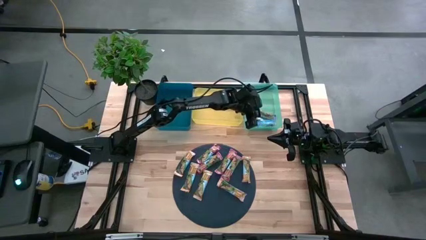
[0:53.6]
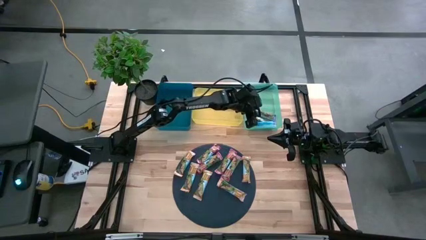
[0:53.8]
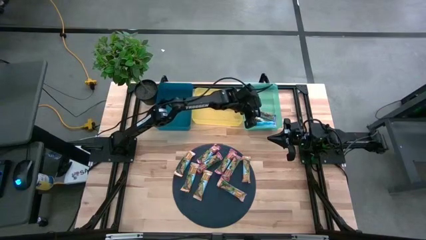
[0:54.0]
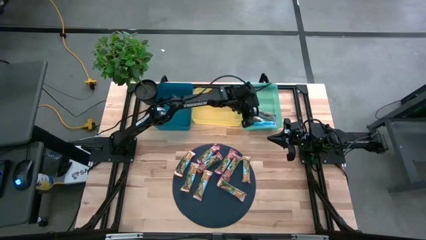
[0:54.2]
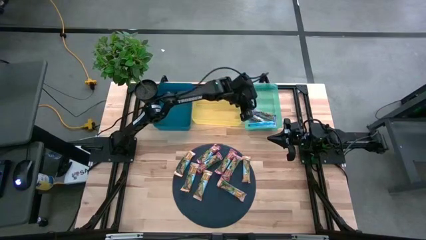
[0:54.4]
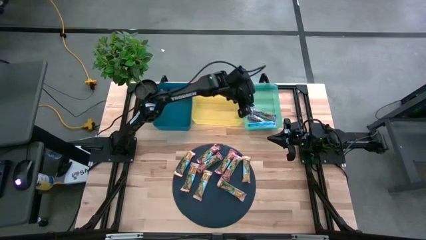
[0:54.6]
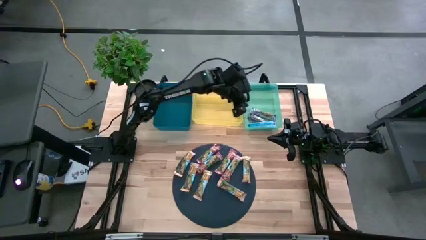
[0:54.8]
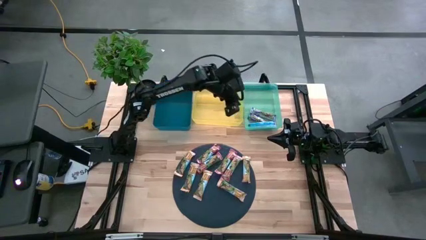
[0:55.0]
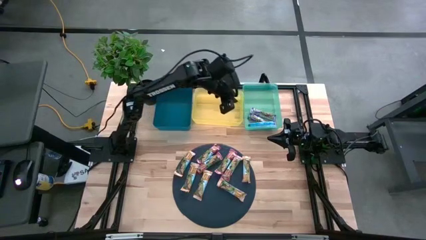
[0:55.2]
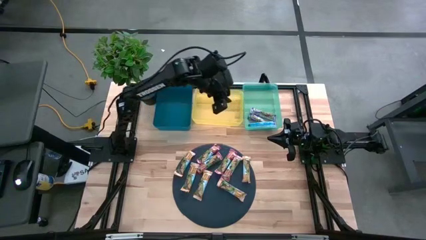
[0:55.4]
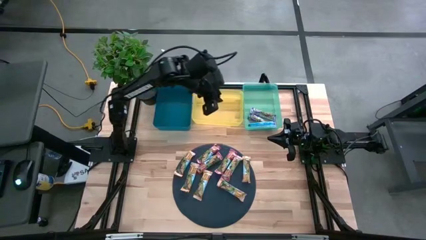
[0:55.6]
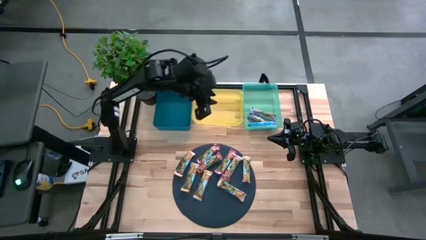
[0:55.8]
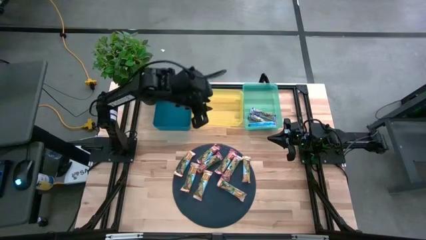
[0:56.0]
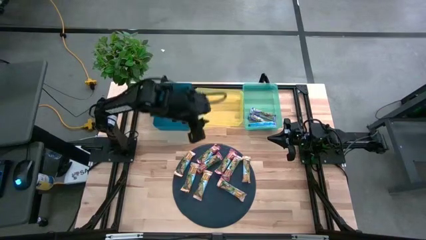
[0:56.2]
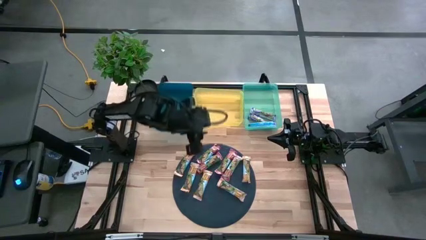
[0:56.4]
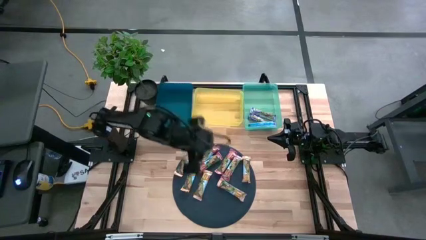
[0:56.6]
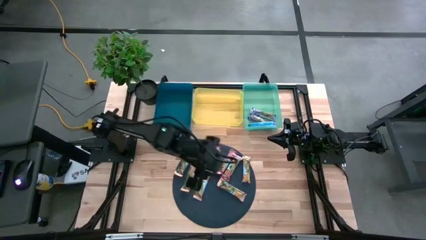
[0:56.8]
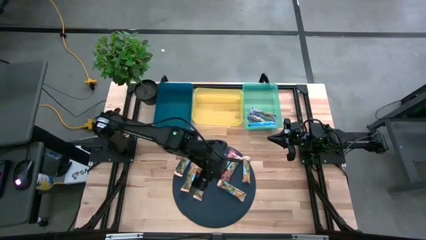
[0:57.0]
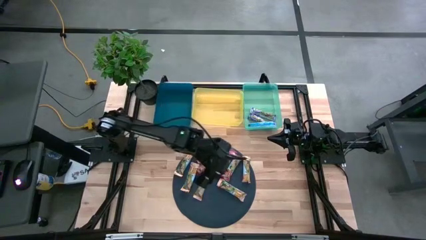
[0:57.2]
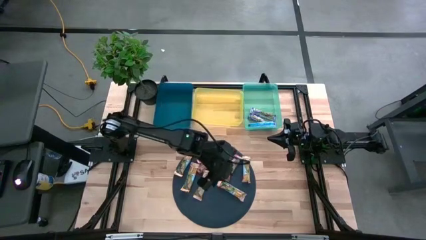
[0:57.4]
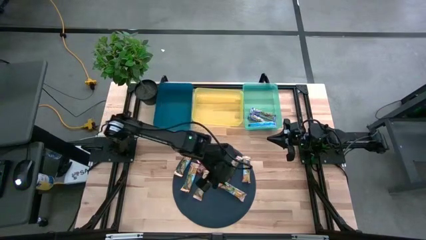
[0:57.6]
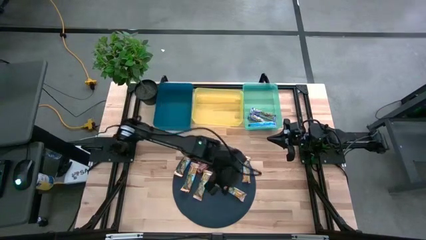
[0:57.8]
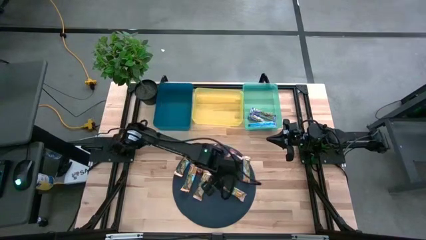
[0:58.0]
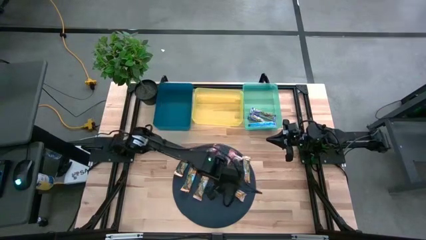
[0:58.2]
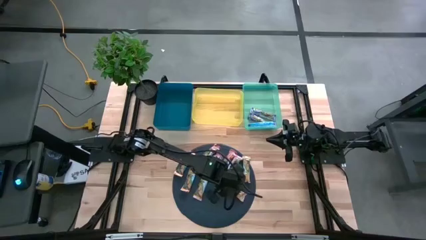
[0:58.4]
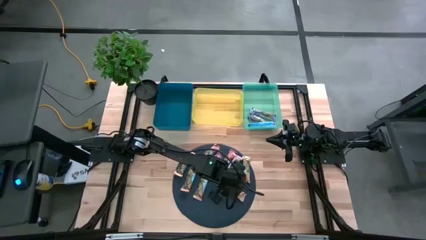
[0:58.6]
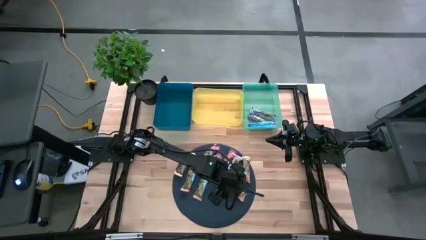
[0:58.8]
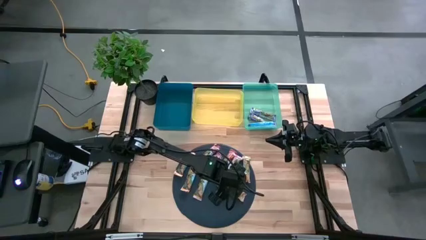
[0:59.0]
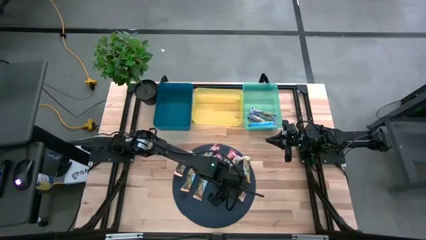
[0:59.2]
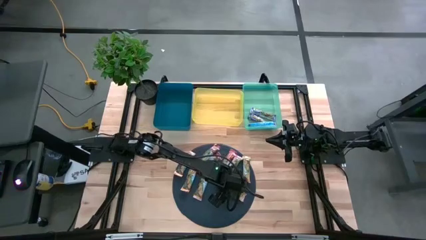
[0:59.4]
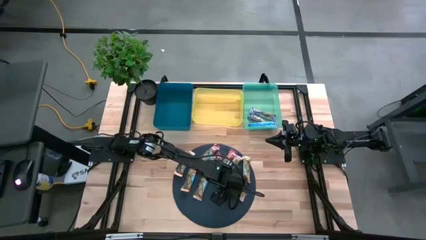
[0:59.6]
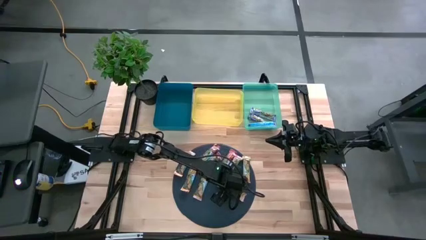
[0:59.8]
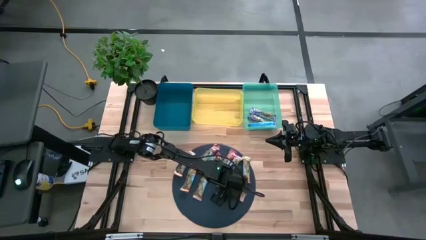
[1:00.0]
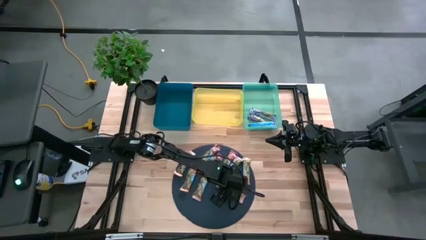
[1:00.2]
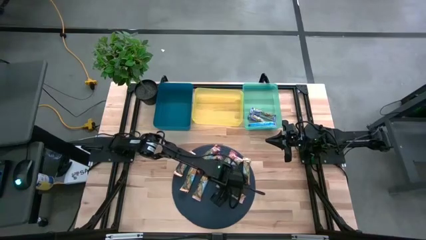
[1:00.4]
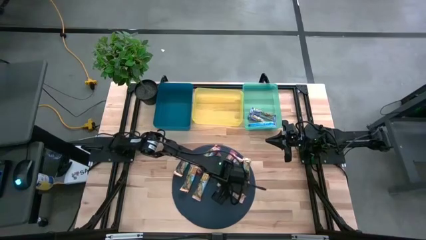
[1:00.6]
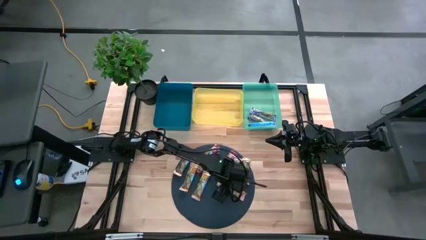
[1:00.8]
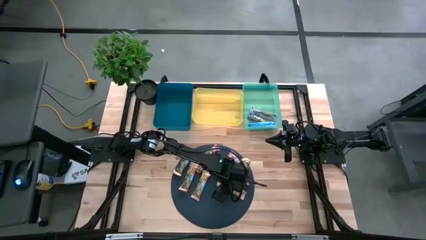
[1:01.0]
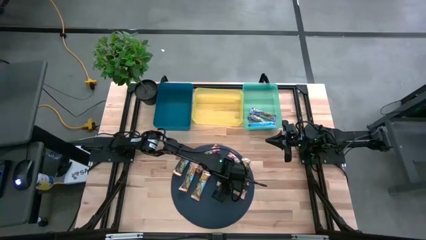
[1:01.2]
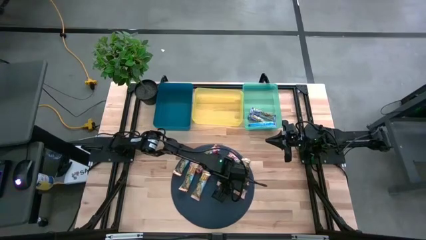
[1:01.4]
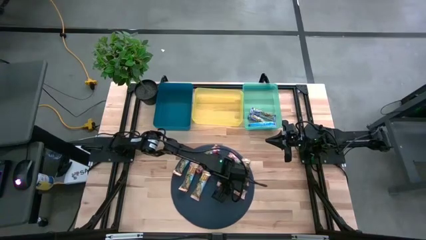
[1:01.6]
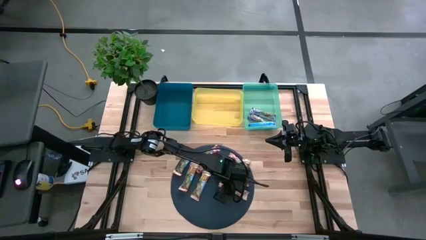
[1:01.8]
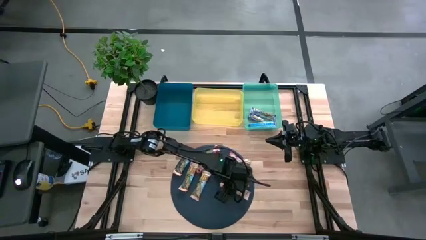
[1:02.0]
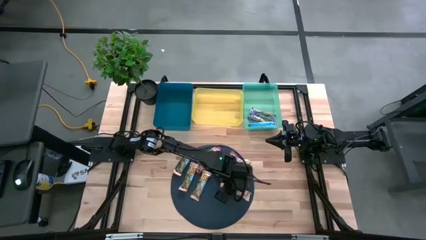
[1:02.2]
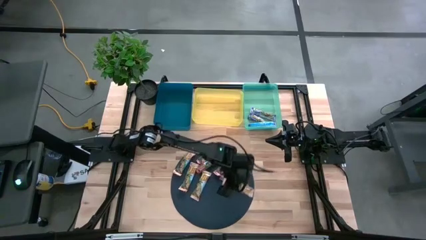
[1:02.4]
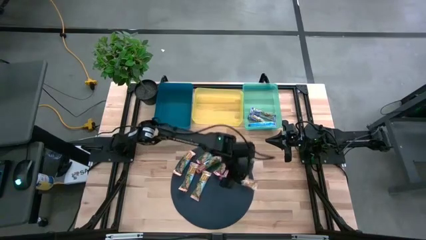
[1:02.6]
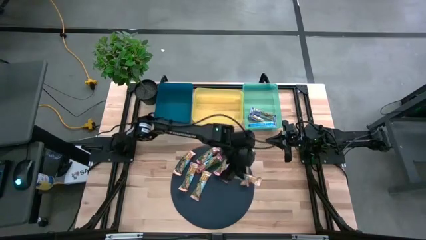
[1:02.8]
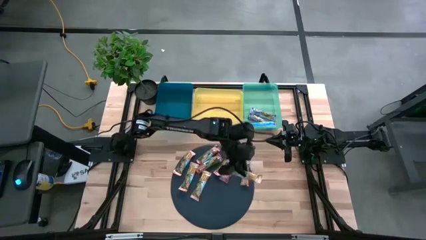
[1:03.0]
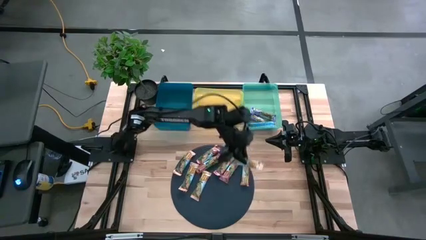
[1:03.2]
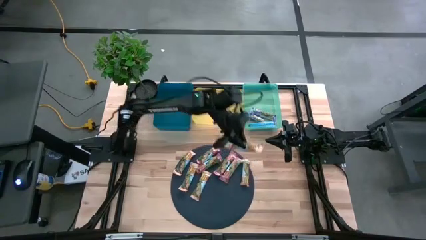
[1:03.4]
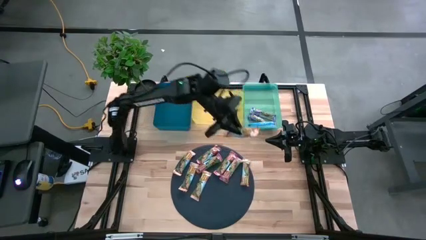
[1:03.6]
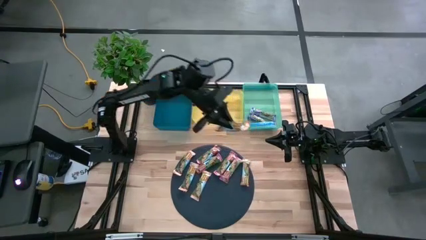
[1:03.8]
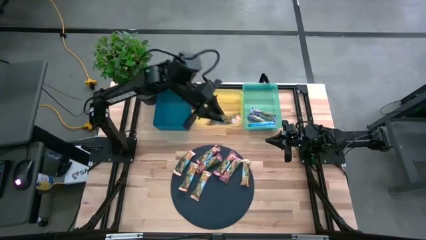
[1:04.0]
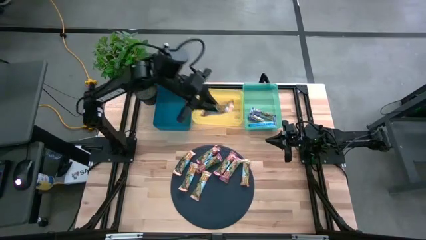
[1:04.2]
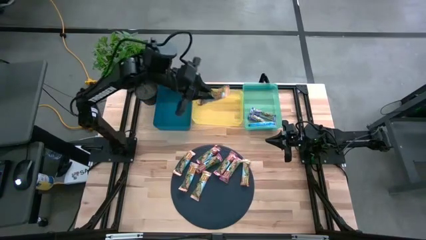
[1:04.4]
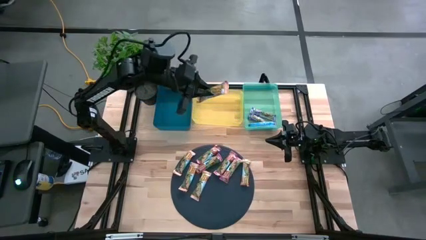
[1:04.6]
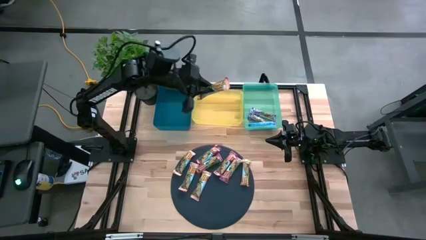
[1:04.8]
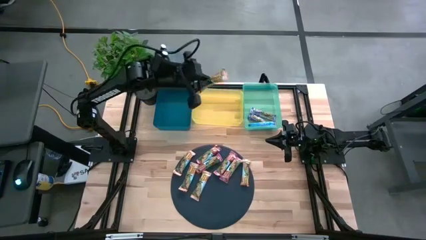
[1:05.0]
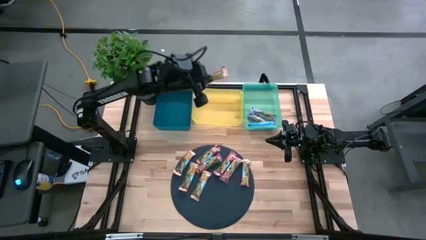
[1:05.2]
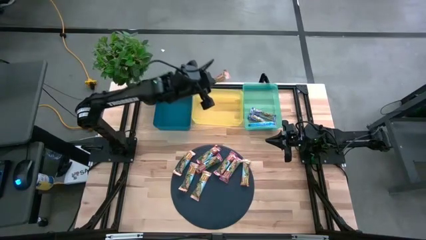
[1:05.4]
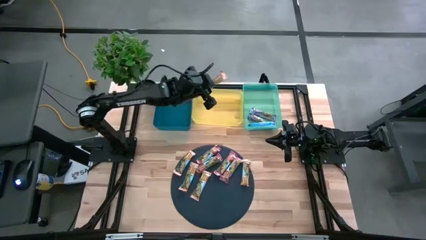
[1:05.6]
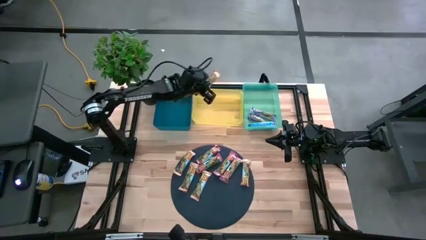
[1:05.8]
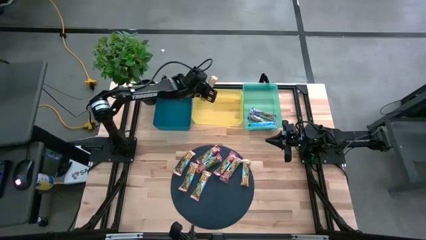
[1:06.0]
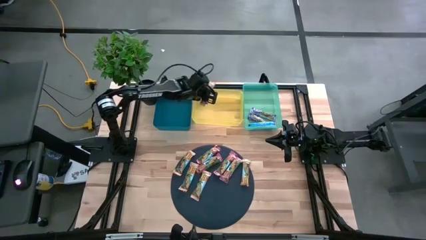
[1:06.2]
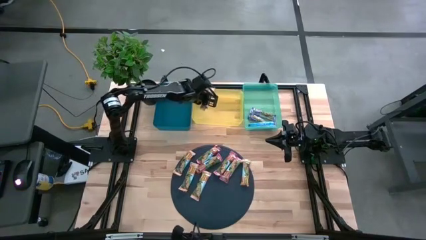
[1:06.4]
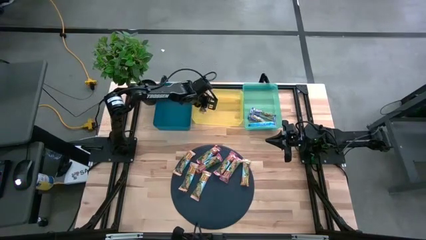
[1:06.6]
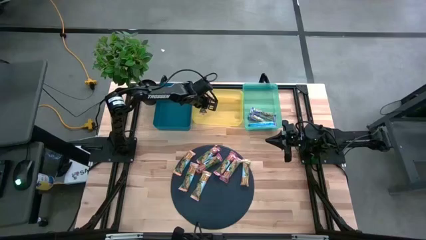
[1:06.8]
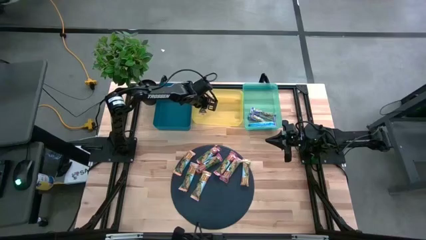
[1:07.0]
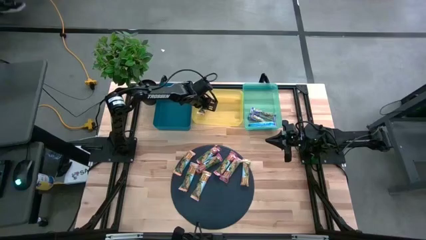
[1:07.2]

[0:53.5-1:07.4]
Task: Pick and place Granola Bars by type
Put the yellow granola bar into the yellow bin
